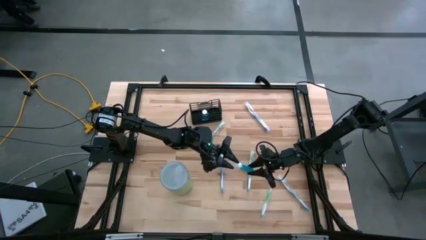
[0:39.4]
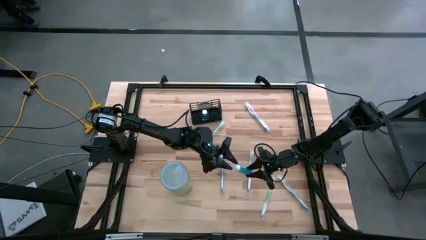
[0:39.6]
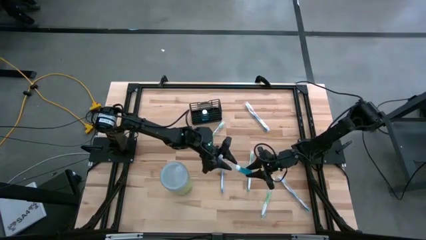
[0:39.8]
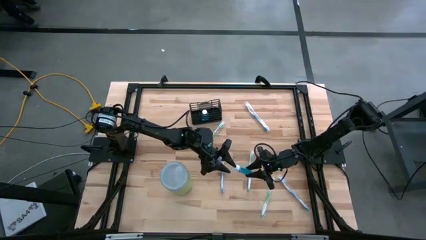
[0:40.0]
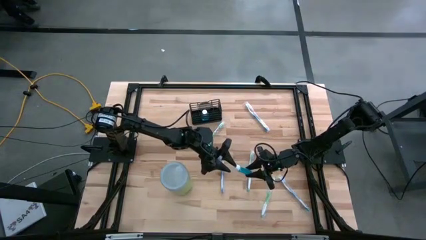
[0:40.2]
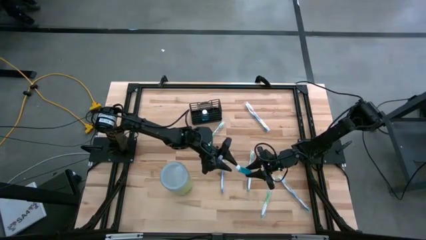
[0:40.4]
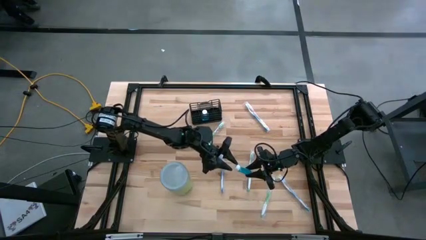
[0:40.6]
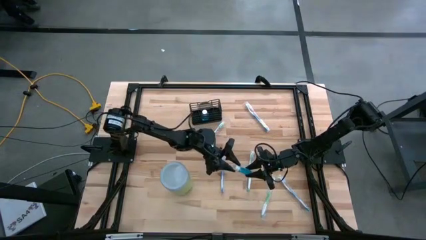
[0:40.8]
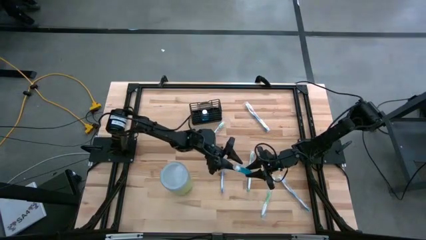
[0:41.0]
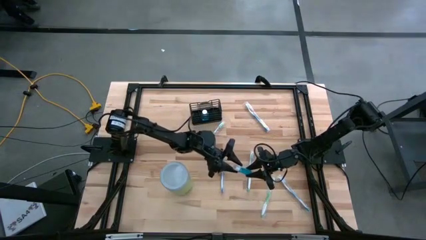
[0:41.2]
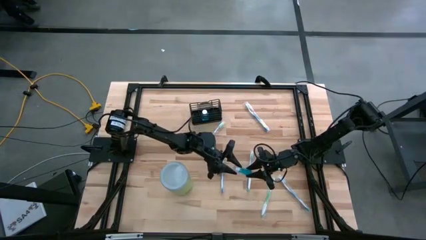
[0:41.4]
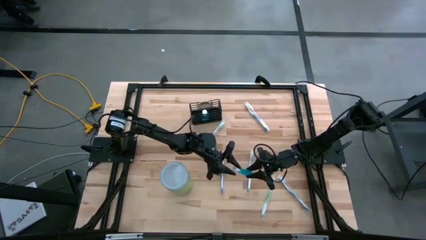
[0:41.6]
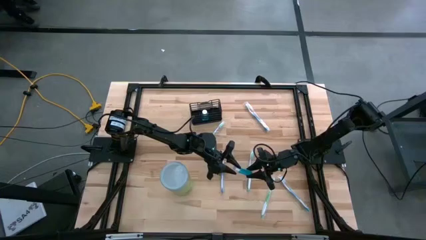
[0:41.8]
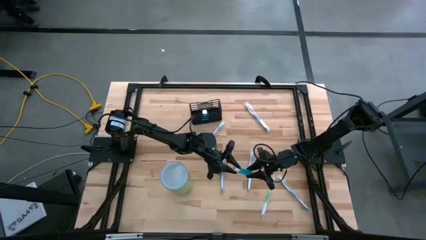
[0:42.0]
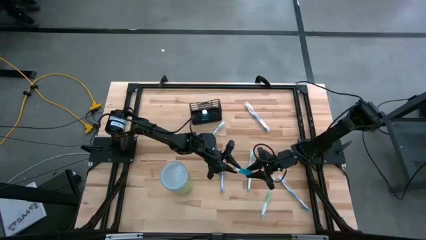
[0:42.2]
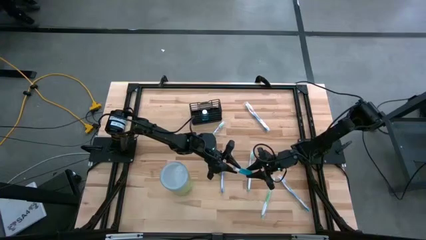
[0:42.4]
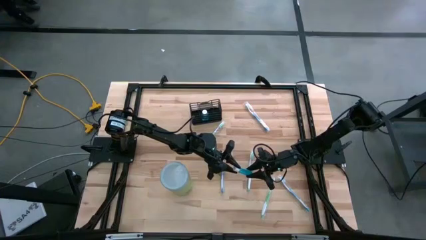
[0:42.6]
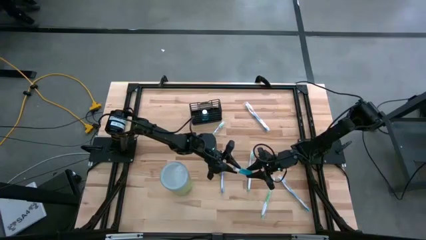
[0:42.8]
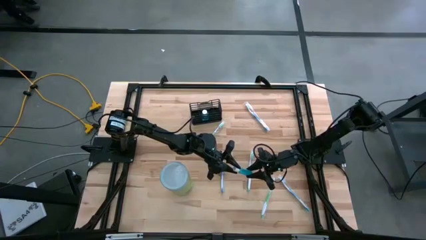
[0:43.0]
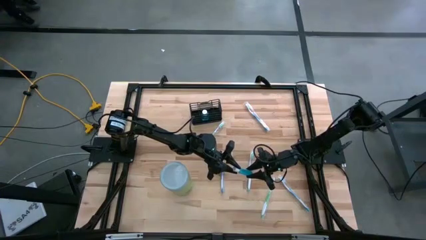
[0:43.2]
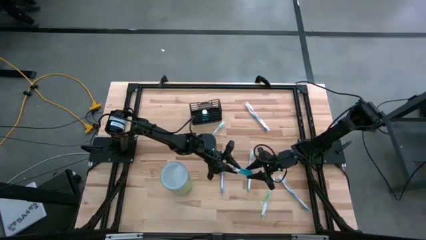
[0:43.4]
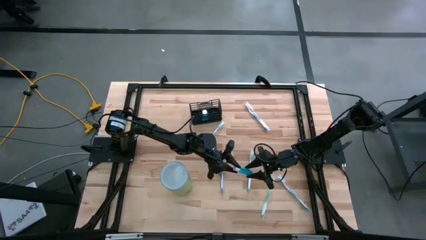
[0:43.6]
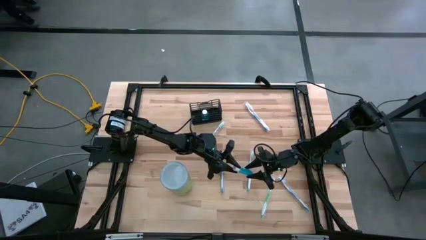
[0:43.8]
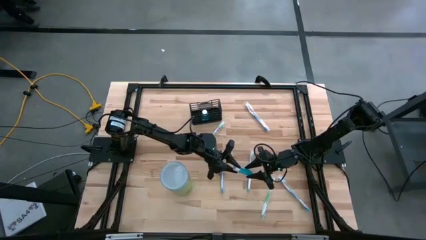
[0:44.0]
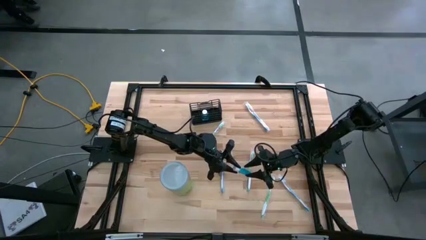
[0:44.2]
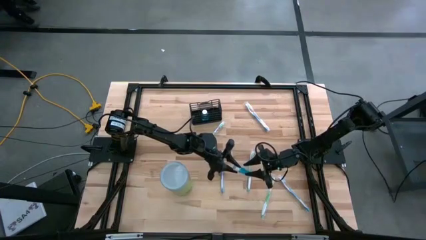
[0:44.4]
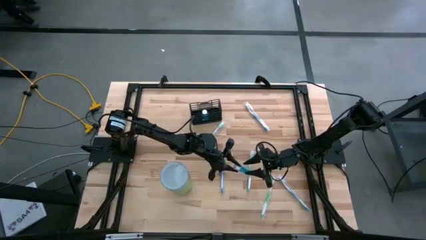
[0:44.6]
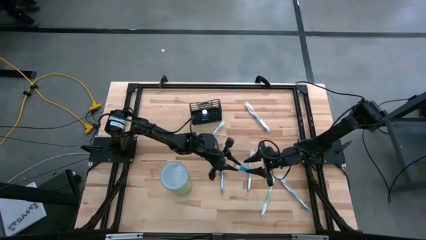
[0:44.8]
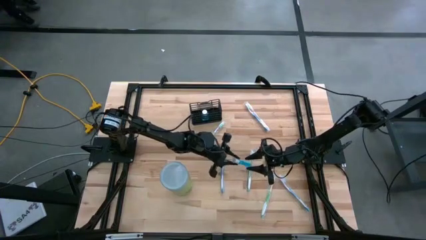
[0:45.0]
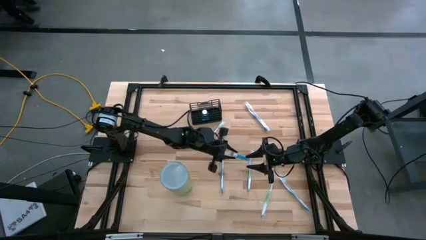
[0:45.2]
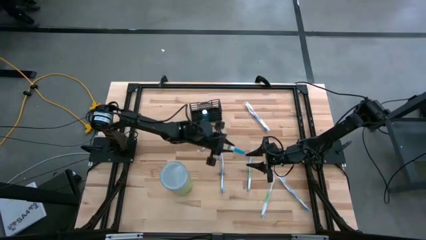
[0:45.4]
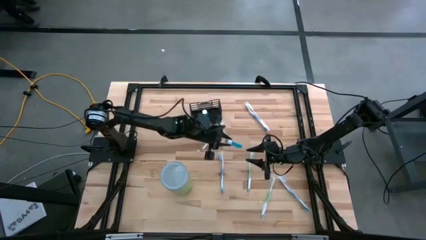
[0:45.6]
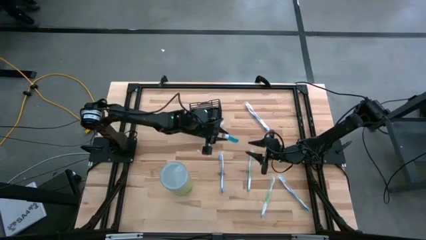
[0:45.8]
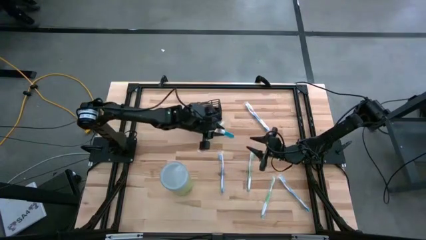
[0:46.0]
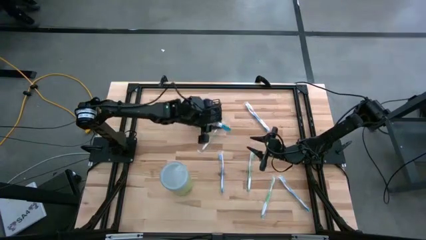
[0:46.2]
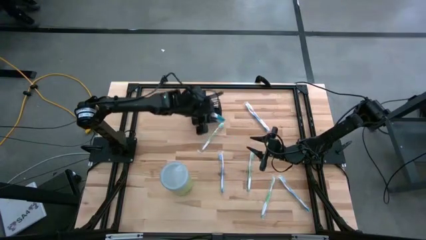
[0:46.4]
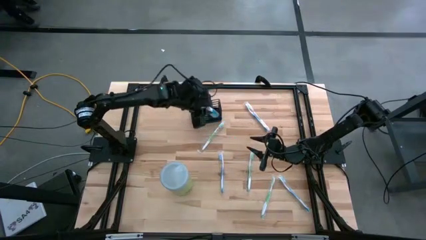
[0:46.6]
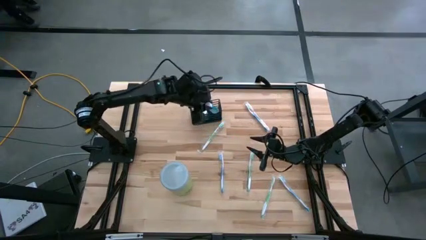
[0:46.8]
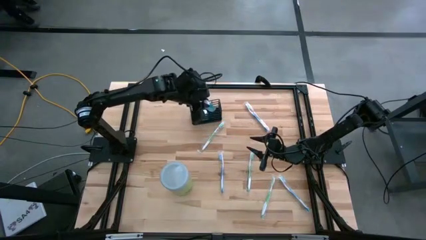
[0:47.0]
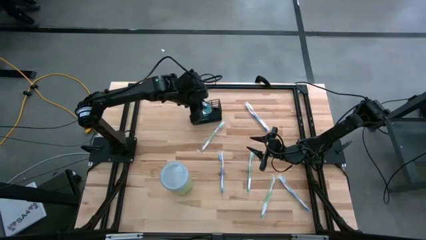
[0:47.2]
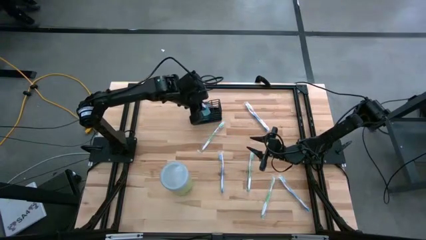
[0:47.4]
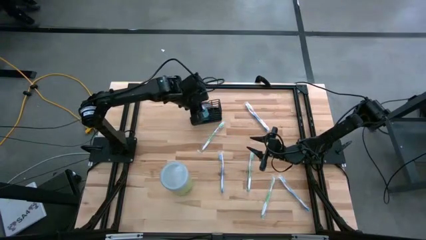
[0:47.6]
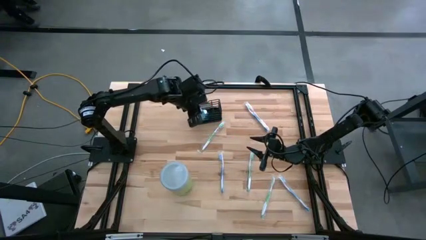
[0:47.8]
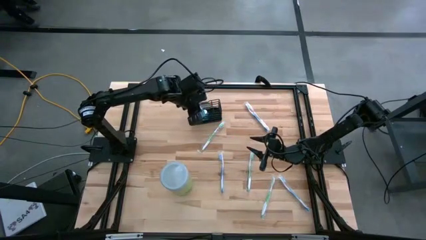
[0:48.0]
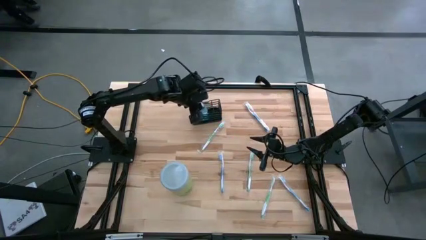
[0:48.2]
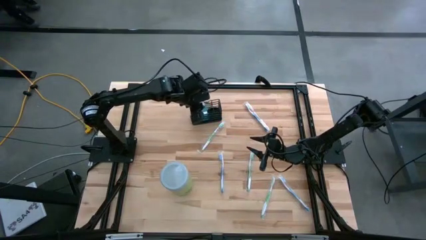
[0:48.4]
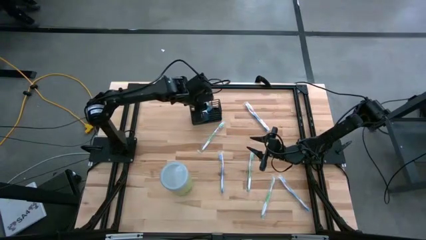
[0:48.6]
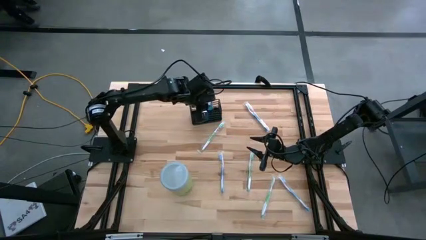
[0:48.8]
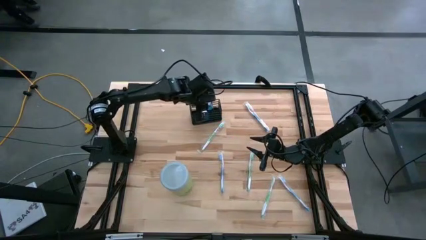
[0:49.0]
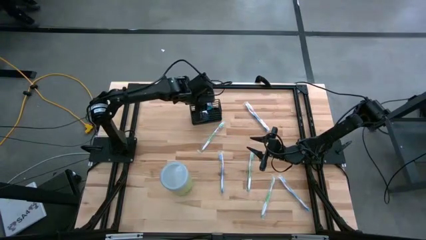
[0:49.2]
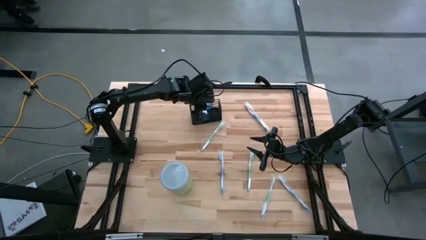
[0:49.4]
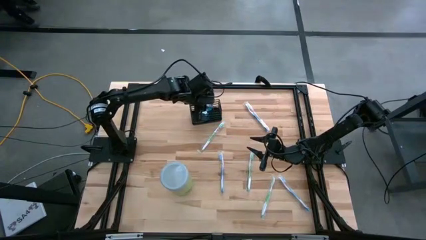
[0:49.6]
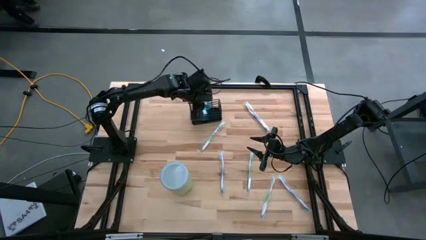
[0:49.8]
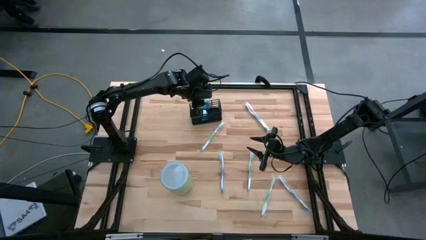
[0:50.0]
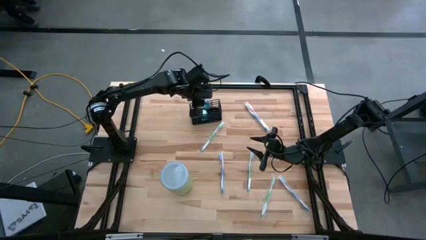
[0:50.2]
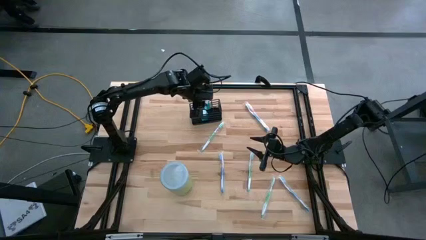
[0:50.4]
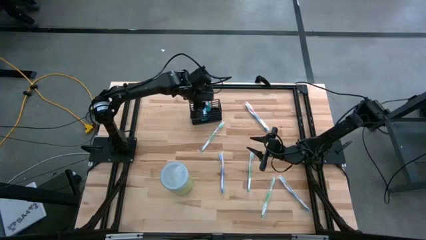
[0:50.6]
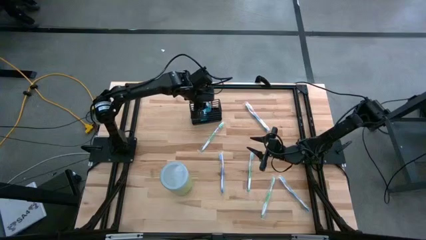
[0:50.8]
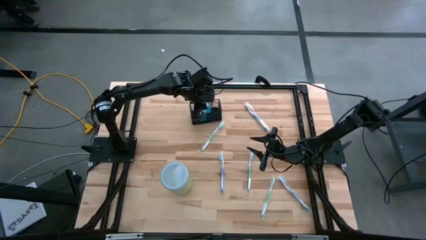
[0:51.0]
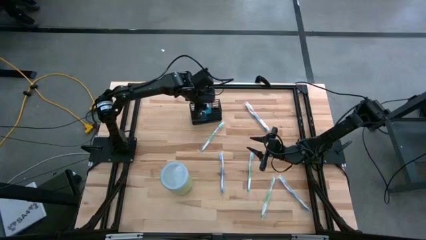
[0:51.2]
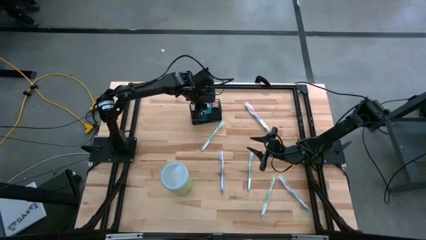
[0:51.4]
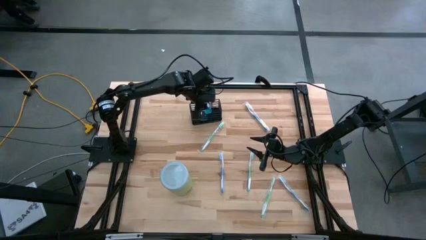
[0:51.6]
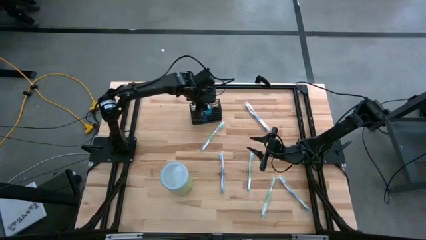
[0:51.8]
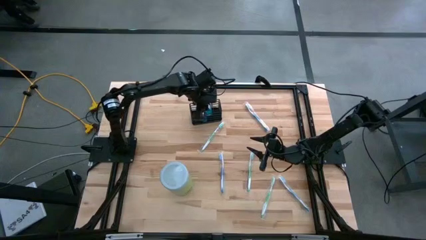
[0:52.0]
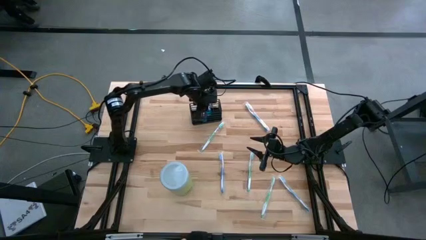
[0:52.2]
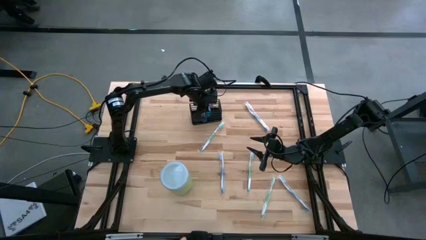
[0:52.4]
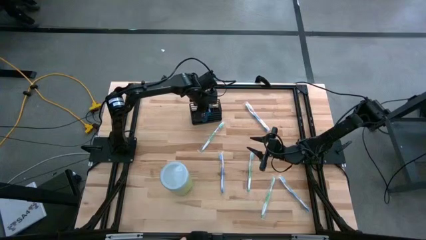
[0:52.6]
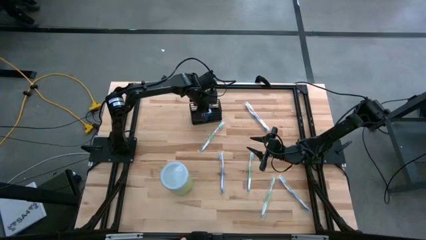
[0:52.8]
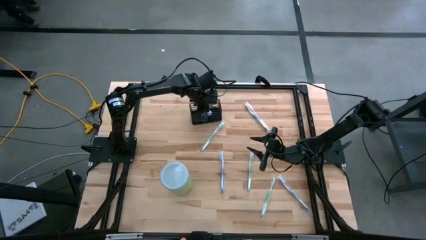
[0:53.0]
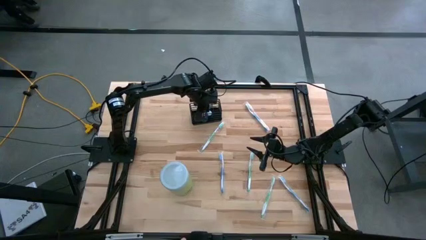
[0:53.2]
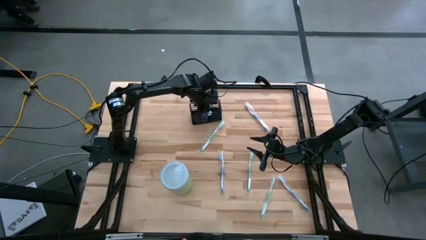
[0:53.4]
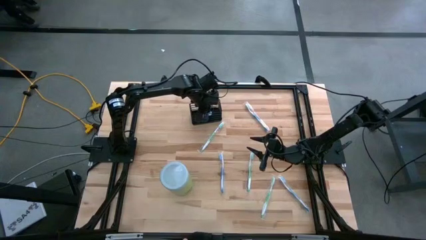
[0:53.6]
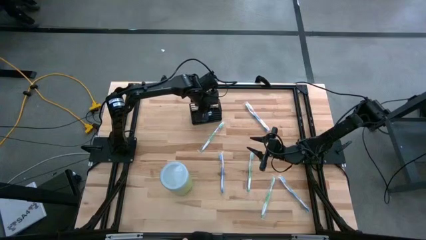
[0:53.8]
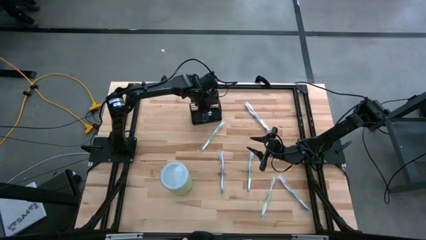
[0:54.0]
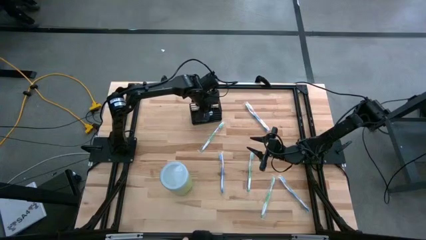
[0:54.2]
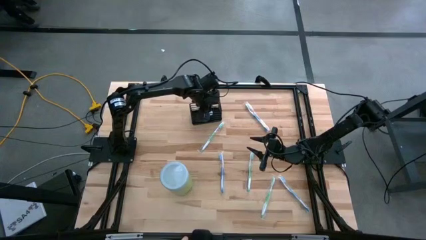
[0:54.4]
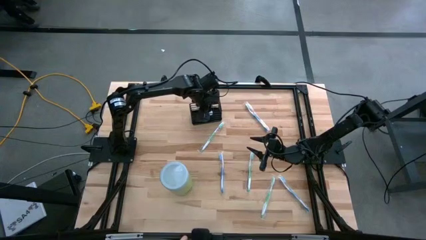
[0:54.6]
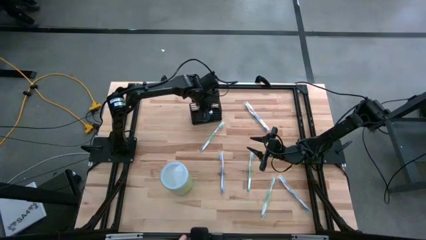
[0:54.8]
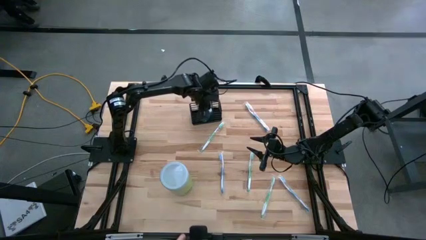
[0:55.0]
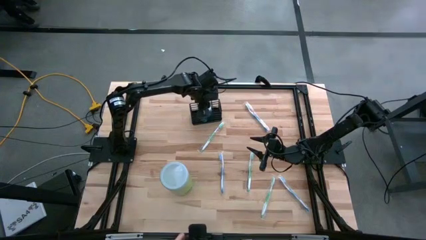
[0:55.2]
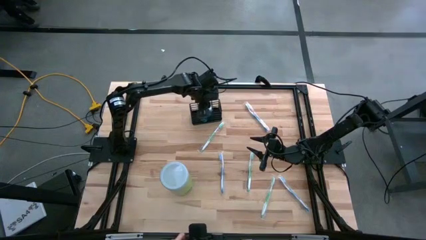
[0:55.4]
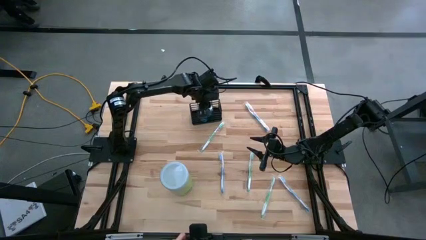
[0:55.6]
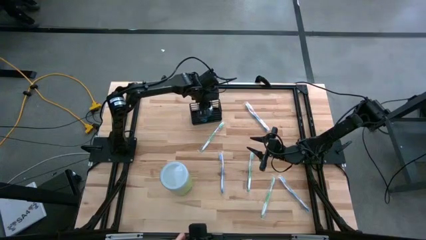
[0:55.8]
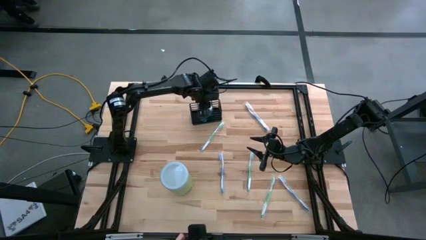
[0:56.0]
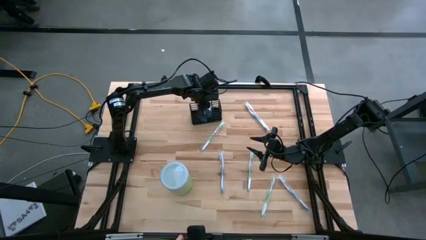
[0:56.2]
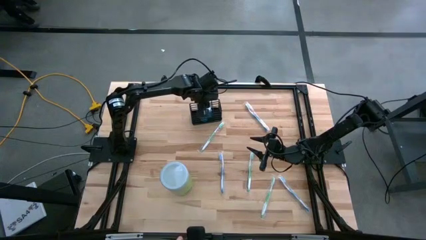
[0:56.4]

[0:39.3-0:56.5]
Task: Pick & Place toothbrushing station
Put the blue mouthwash into the black mesh mesh organizer
